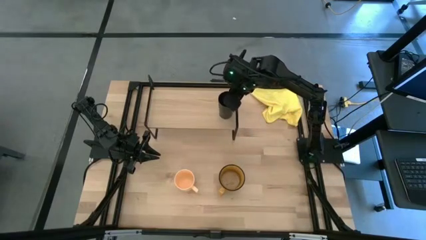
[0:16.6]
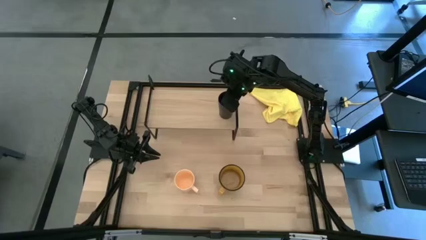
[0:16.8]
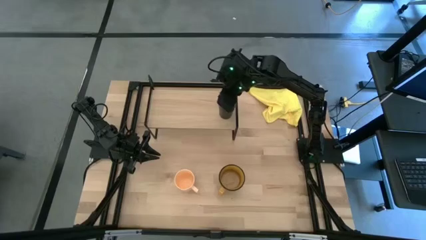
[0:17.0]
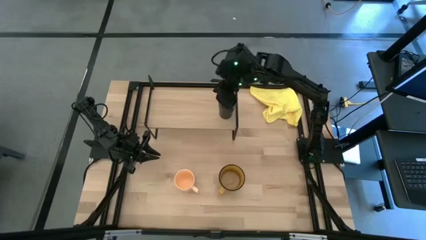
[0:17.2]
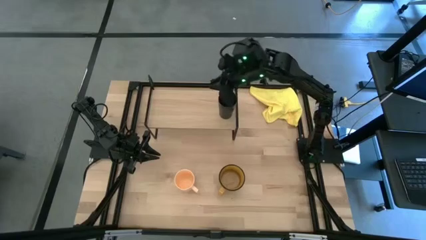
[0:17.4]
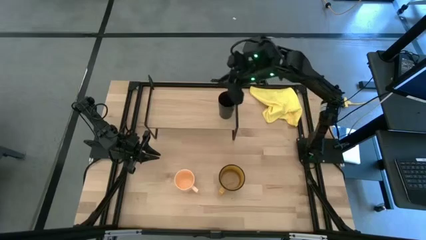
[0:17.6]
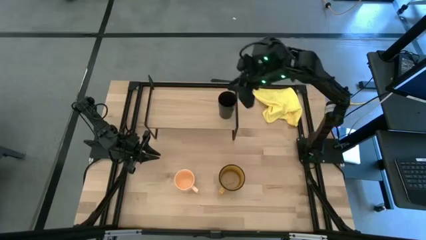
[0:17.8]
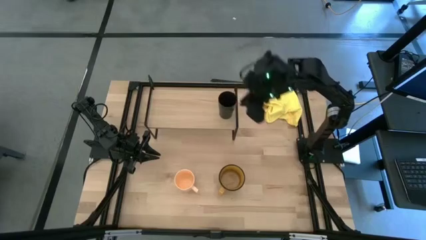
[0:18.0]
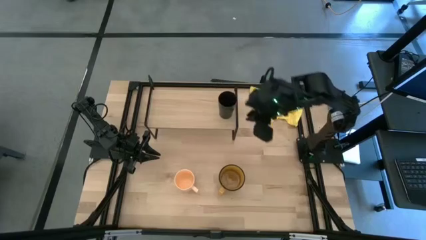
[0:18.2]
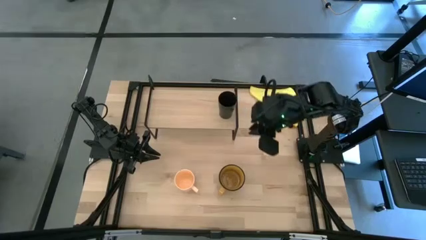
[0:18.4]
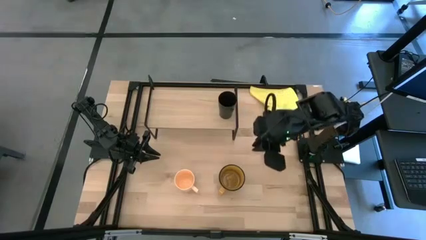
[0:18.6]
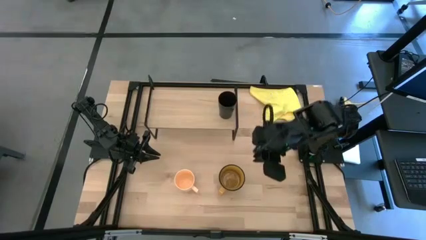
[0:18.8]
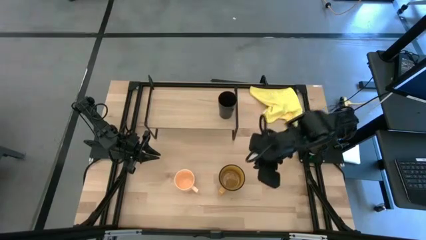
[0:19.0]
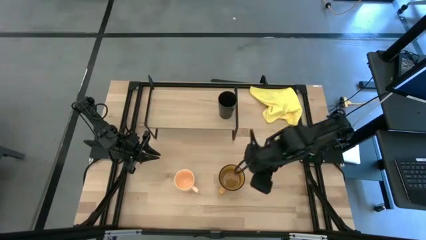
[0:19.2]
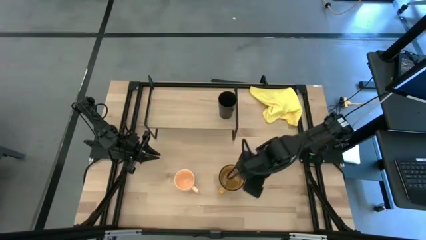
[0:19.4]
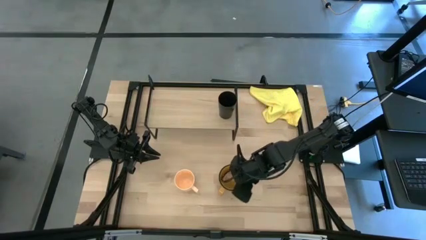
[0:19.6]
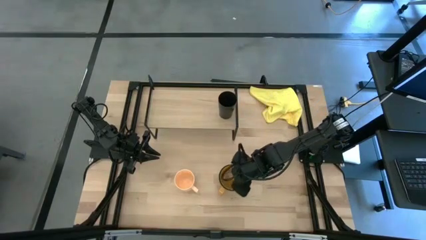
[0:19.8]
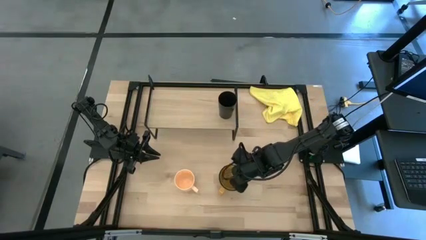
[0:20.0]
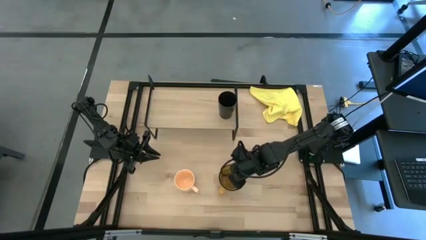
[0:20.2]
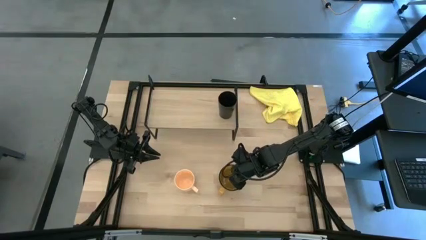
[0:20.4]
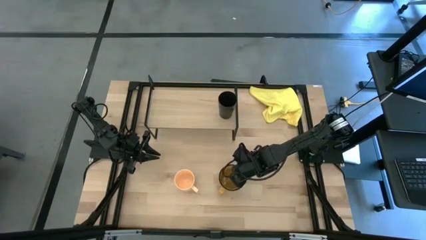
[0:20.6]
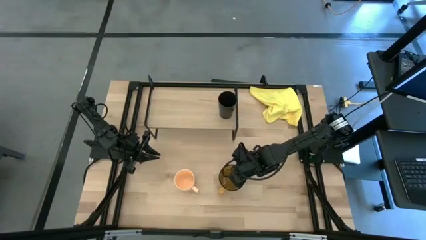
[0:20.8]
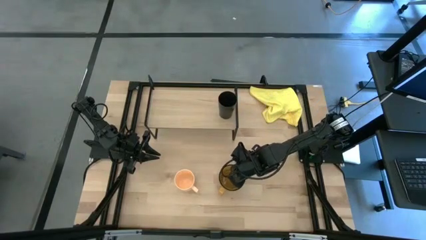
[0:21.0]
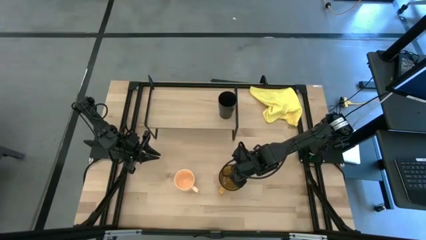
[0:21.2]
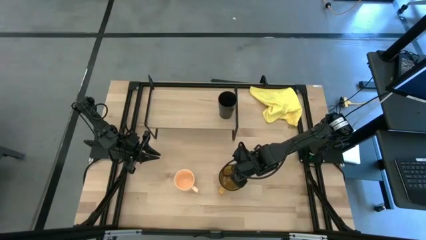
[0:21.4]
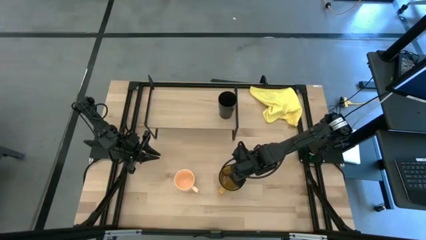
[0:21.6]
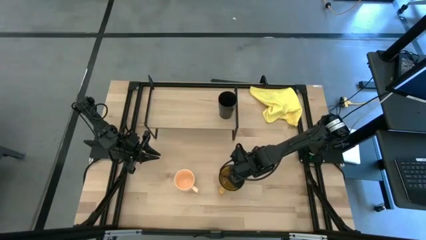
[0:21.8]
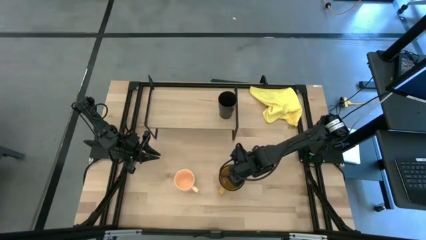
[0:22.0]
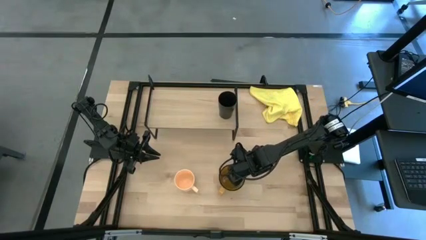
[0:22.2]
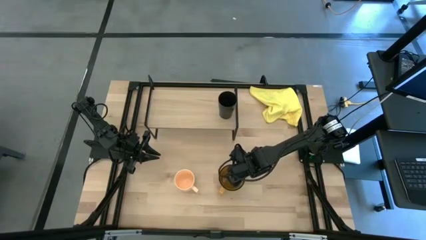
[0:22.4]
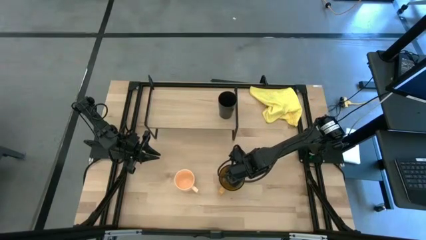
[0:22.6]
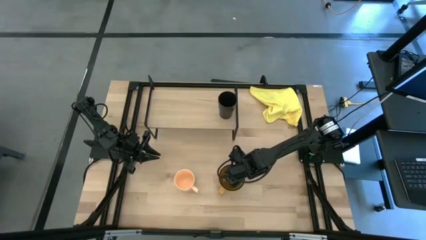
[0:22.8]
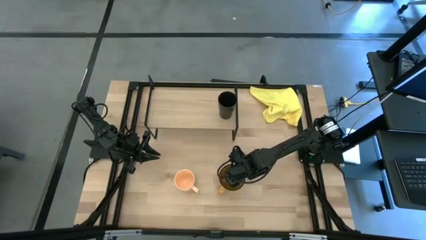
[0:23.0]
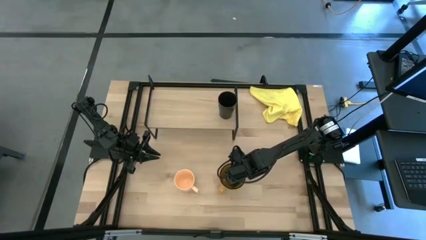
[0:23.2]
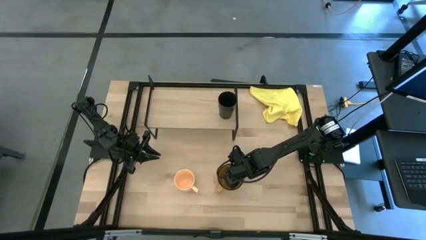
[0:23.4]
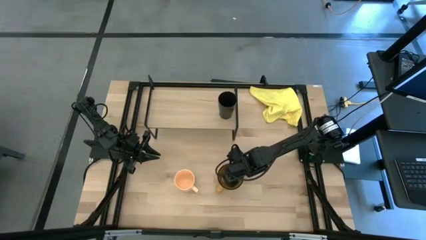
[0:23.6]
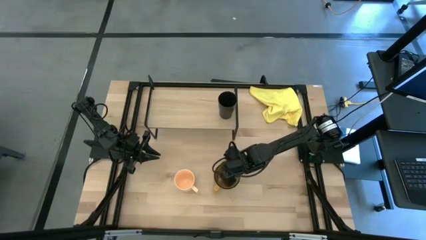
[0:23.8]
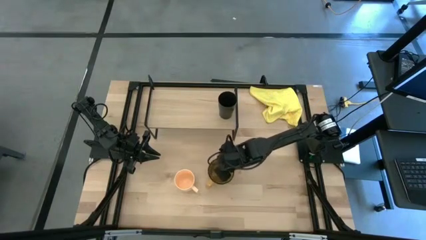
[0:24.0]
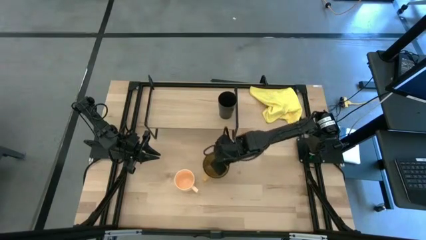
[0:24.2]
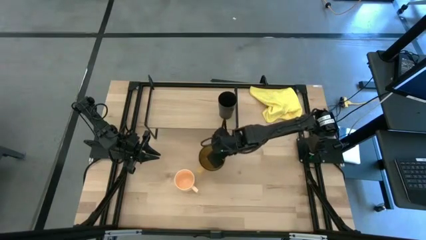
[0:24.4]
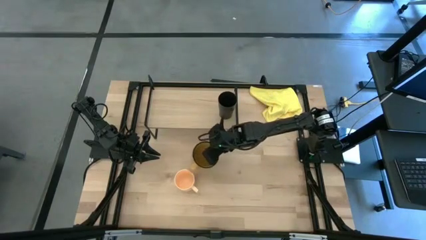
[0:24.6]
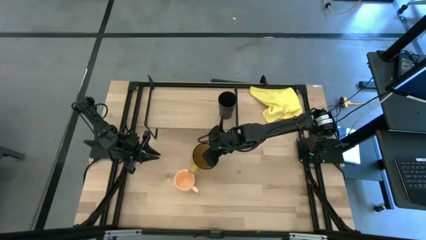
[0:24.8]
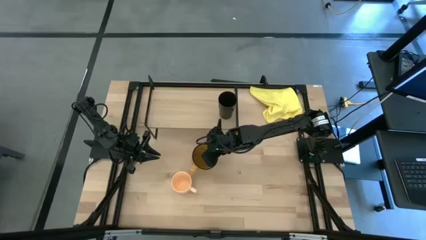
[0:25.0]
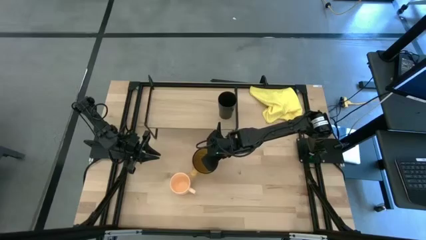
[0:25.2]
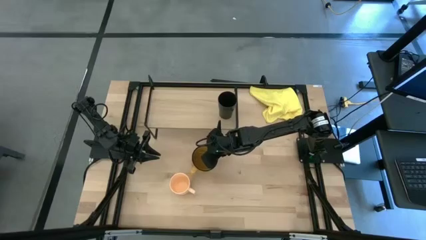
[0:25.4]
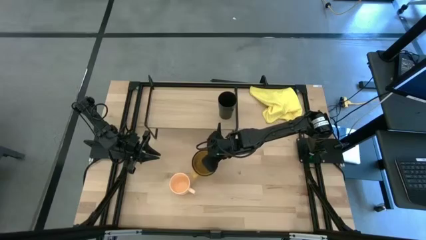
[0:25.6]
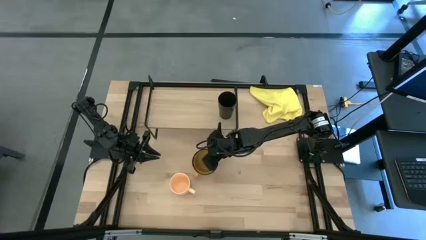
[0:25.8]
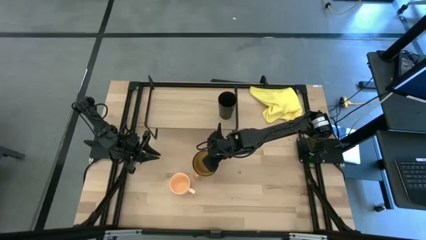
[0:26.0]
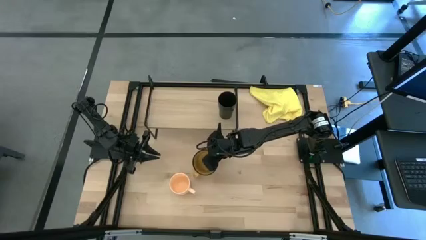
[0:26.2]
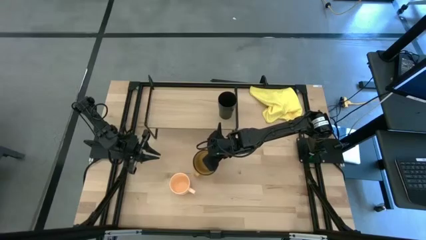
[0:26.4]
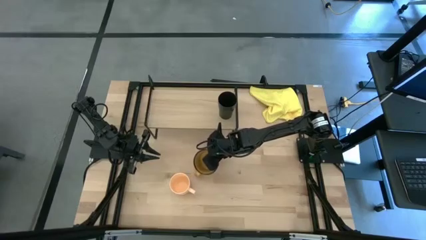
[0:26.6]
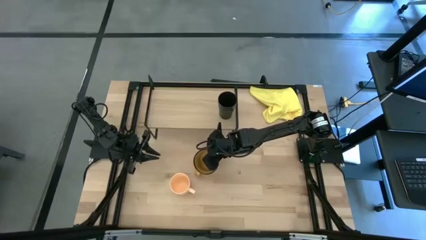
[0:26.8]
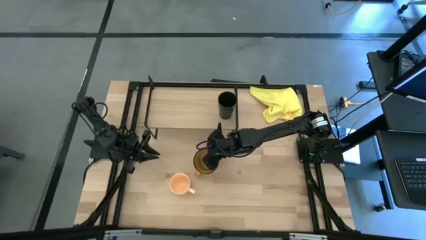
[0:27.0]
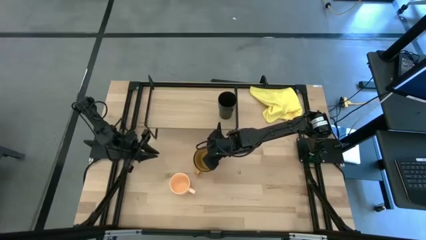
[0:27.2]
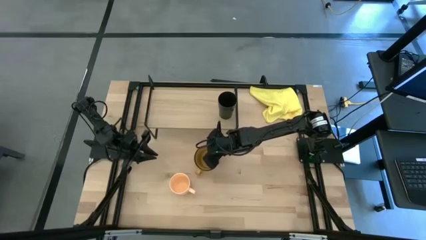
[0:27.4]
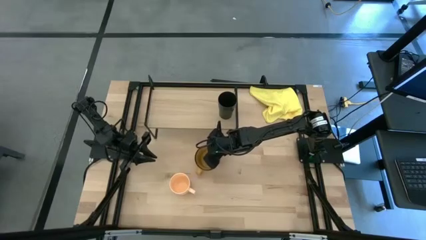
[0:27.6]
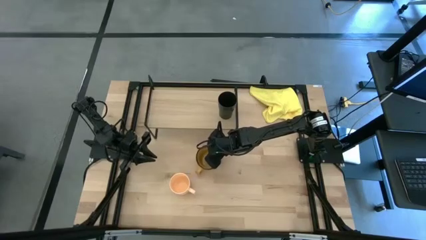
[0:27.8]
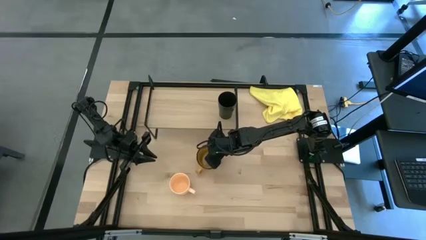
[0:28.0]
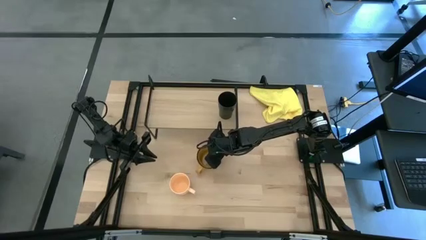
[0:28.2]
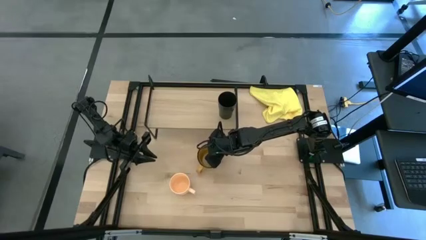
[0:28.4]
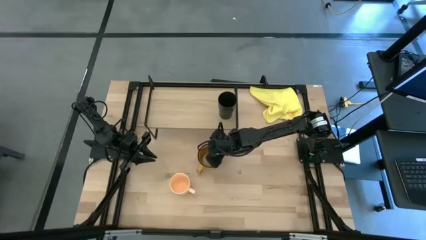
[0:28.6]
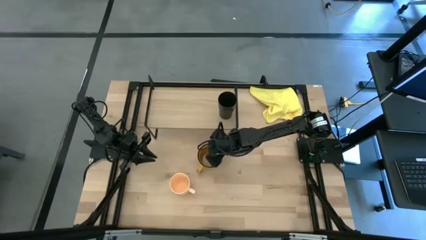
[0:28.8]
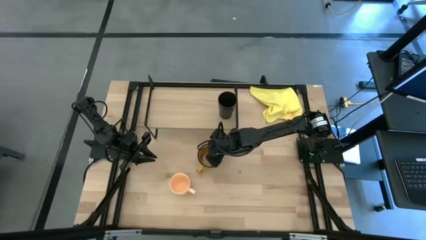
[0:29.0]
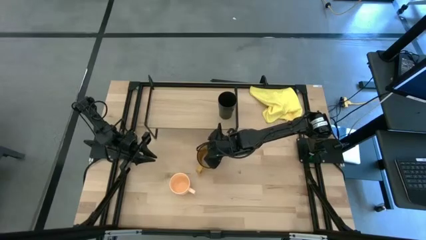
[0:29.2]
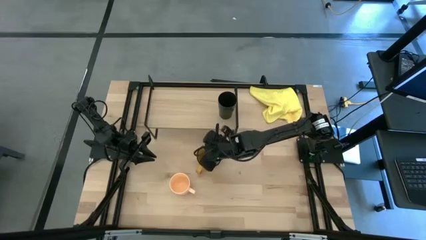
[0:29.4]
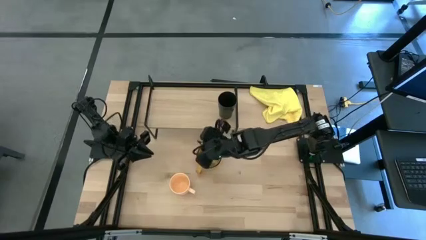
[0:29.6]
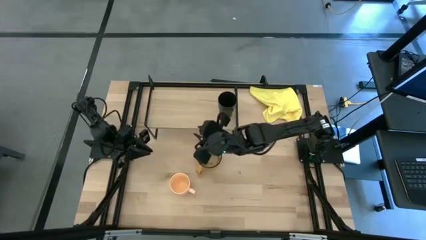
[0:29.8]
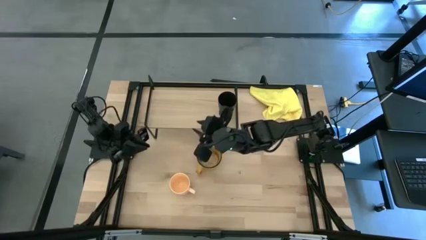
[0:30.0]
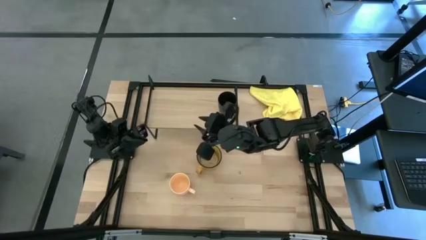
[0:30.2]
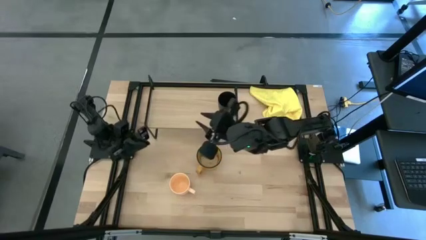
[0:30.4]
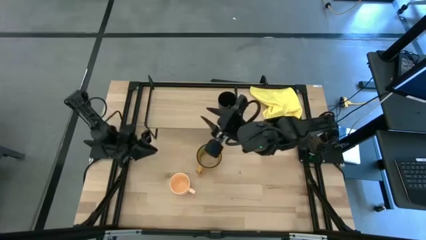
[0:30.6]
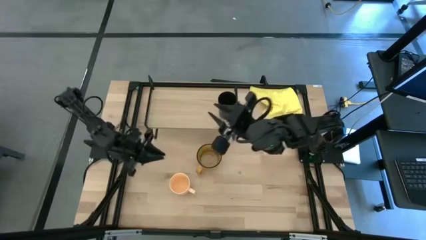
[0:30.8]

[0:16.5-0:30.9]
Task: Stack small to large cups/mugs on shelf
Put the yellow mug on the shelf

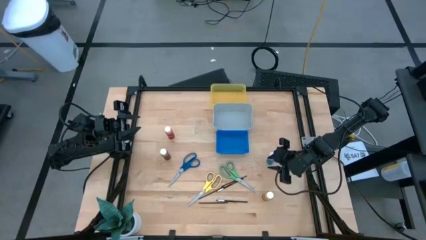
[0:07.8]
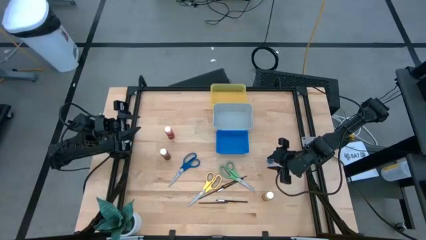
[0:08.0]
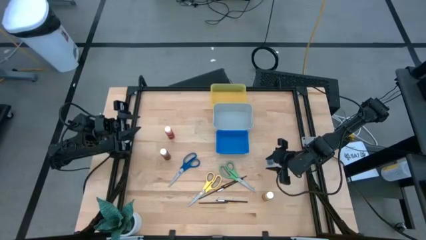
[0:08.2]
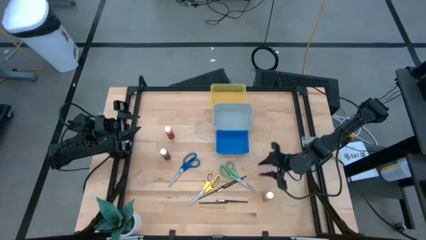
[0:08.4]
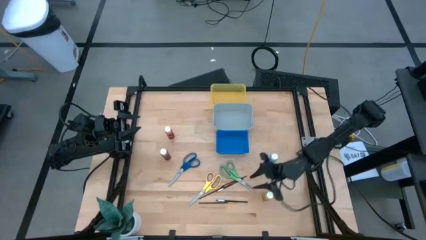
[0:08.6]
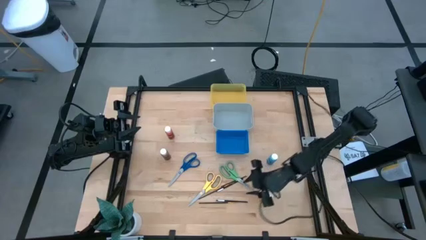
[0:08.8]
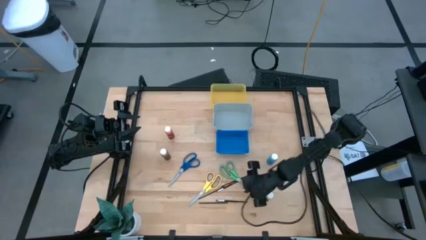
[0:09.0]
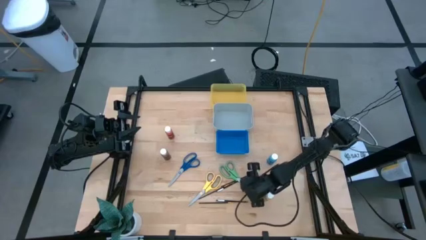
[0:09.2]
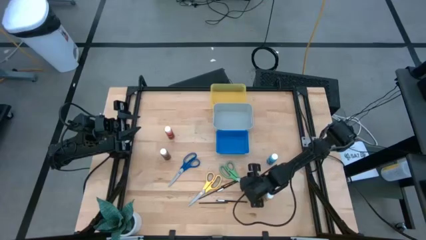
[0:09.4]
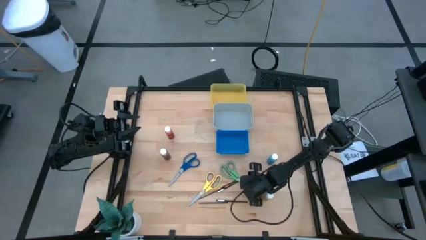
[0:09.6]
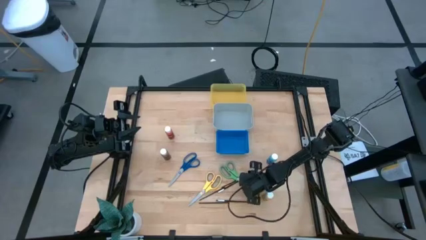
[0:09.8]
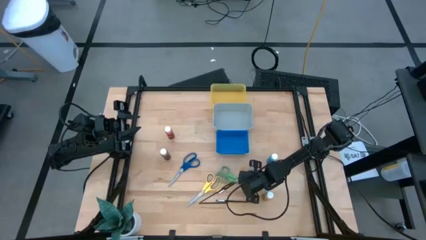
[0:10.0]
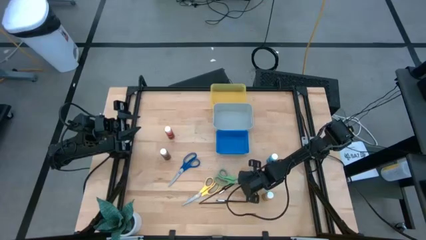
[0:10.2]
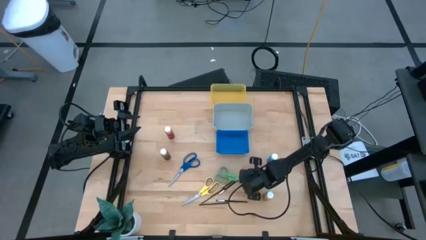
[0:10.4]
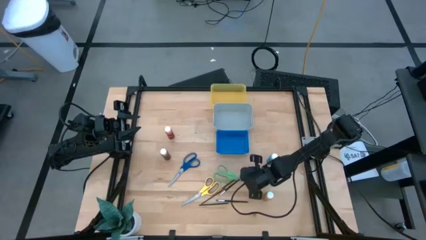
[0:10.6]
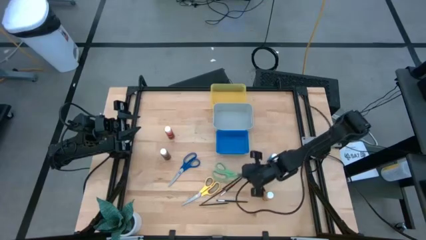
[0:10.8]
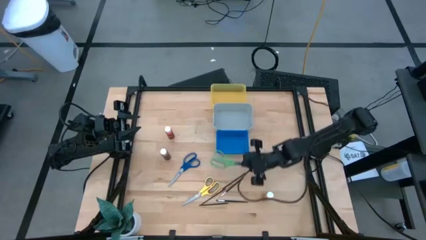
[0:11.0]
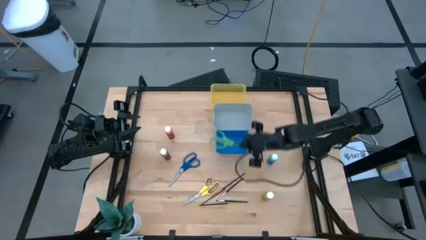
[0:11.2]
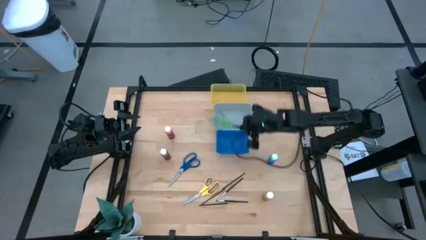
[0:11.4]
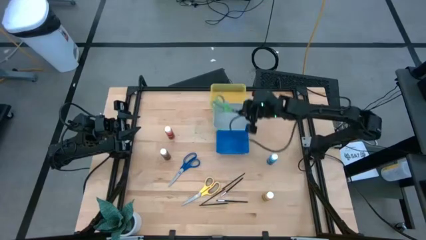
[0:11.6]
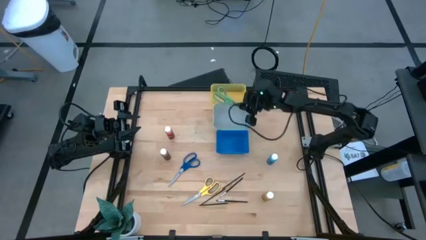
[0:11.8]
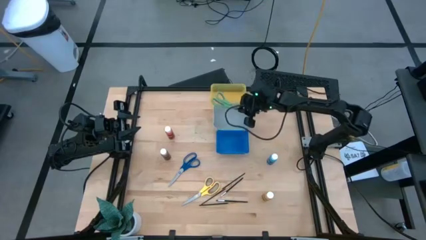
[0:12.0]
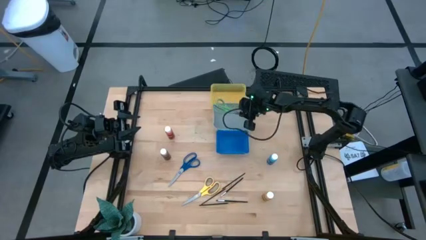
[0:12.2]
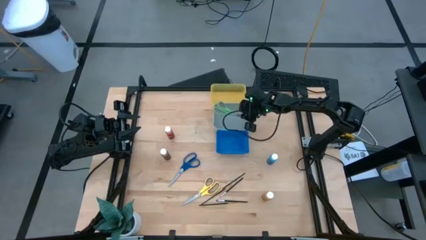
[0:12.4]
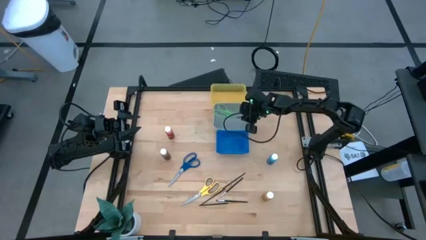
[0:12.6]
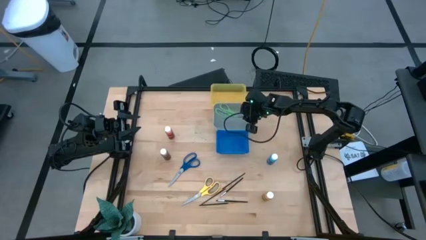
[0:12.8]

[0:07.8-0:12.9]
Task: Pick & Place Paint Supplies
Put the green scissors into the gray bin
